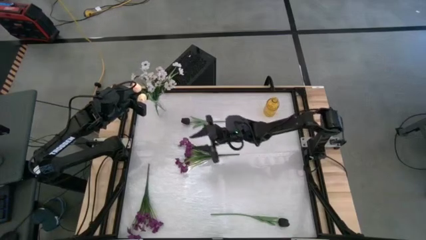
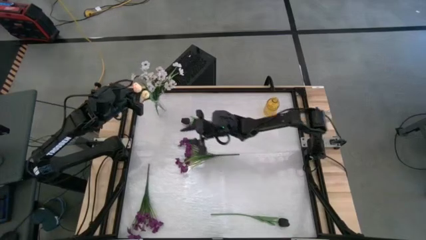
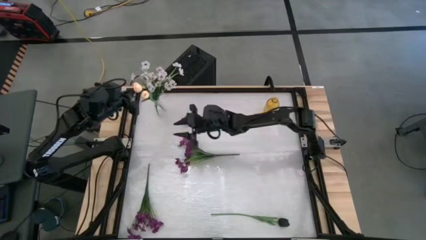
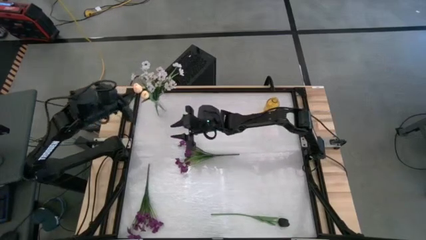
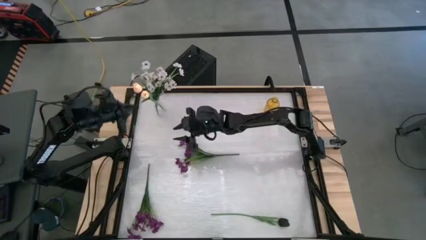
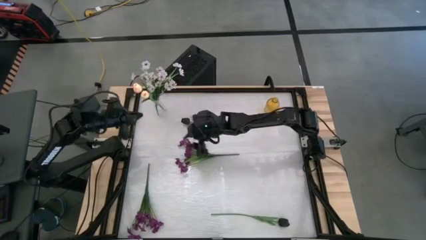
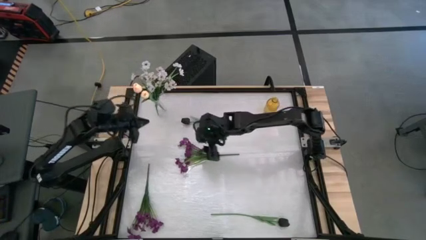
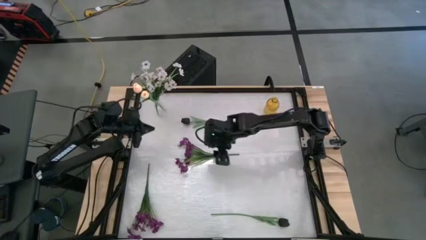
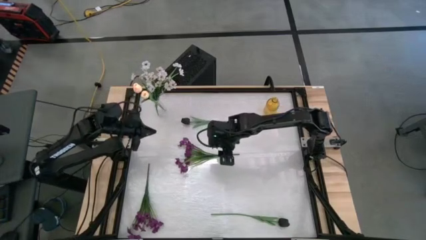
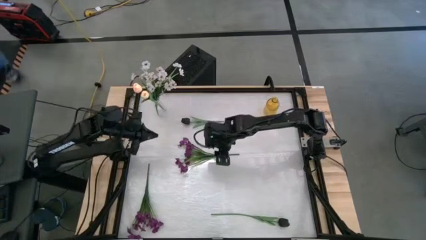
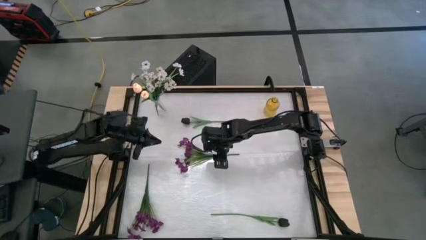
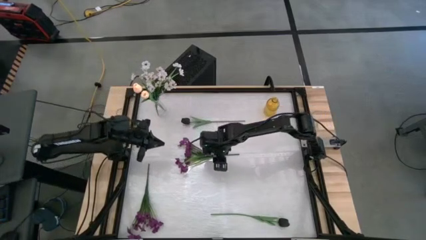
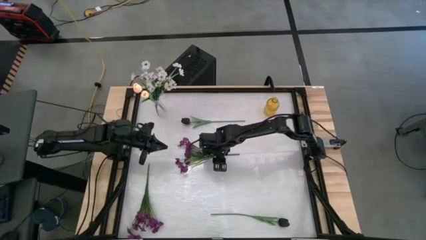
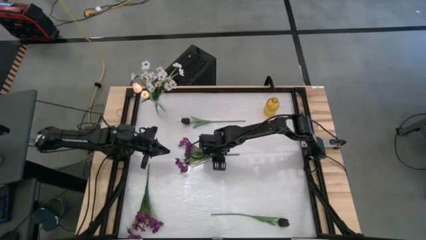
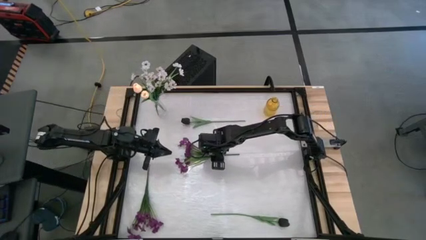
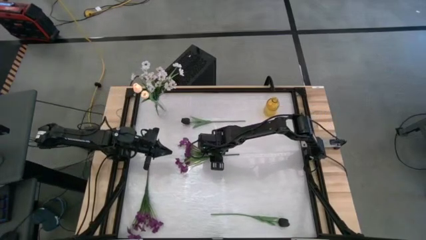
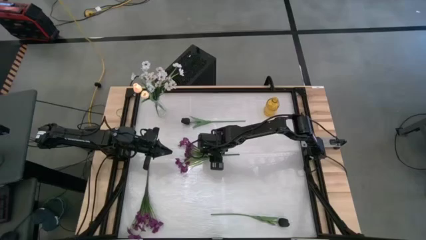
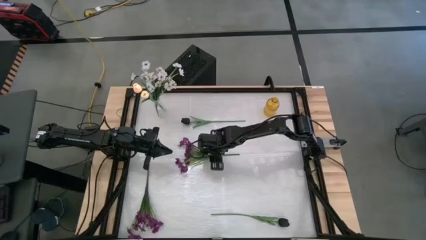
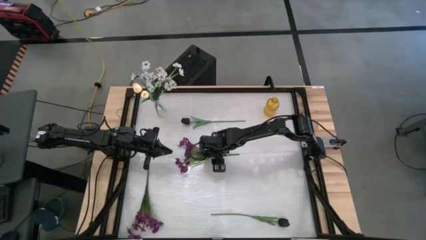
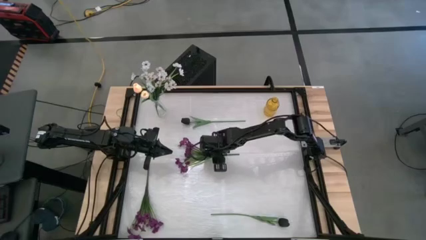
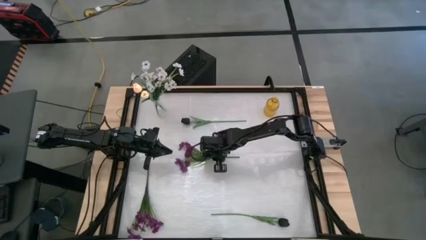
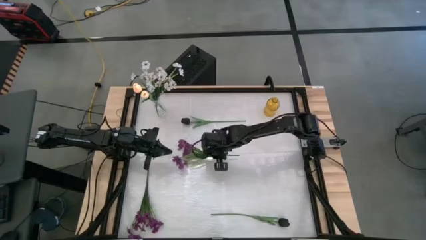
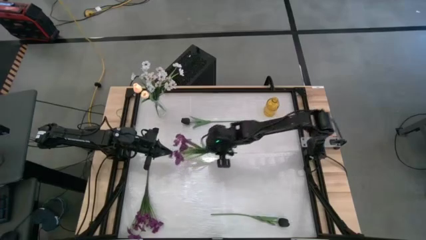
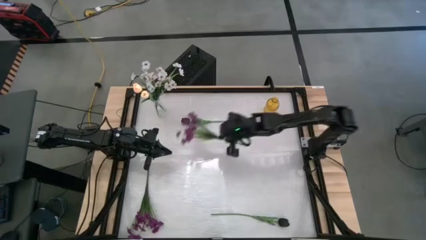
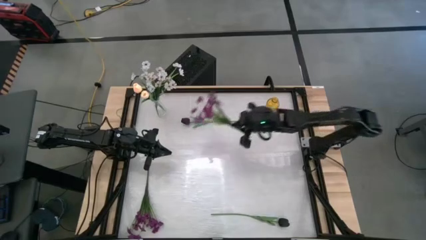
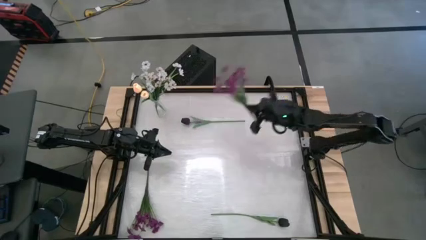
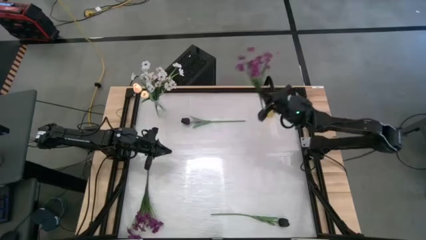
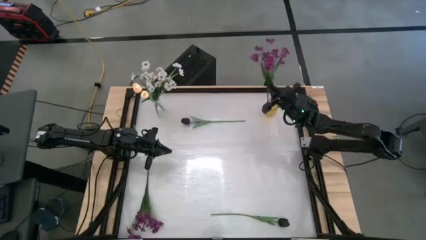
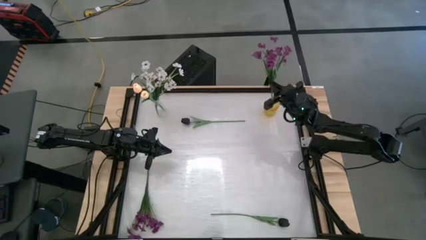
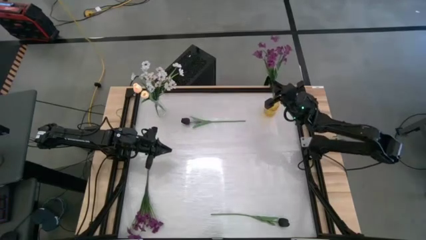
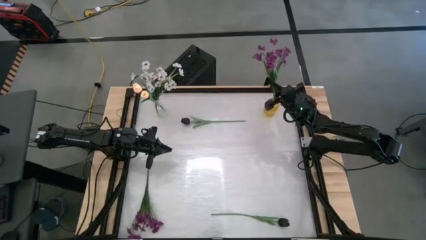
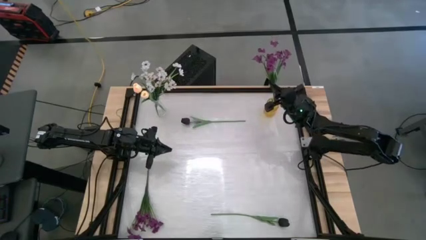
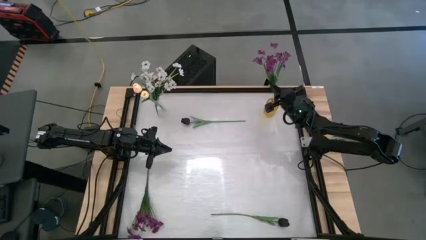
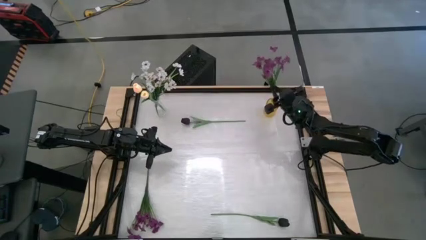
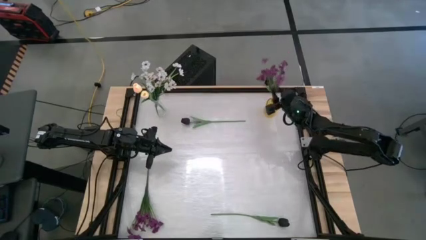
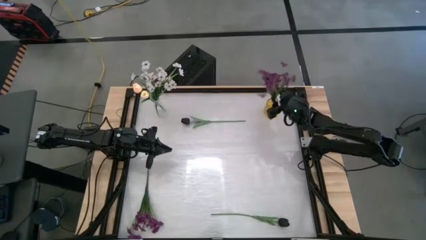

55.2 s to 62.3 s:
Task: Sort flowers into vase by color
Put the top purple flowers into the yellow vase

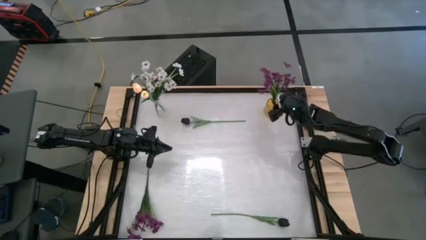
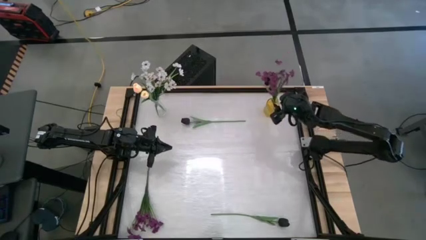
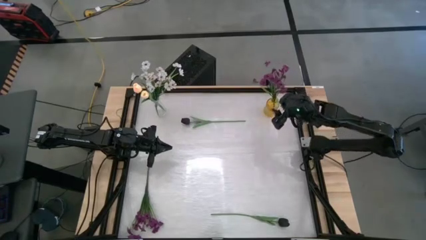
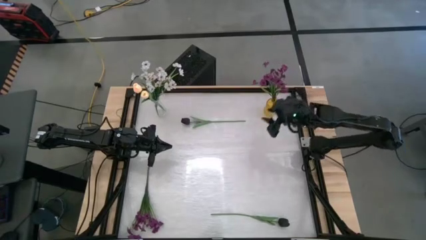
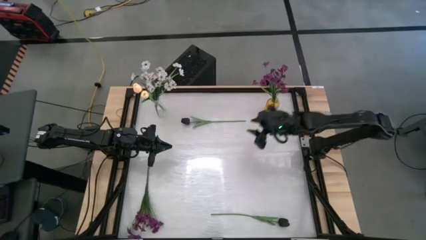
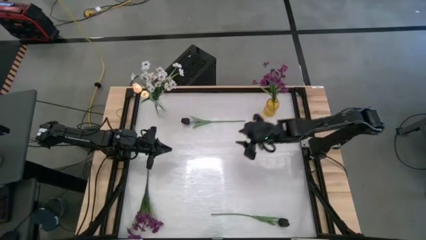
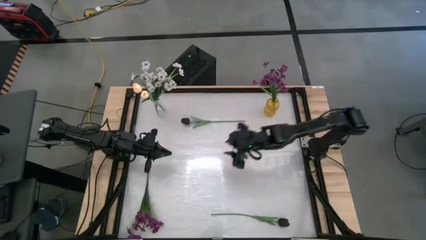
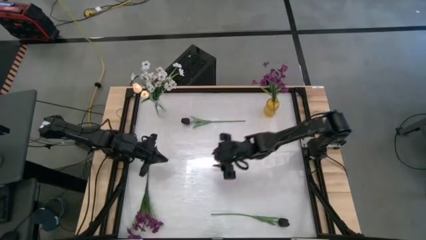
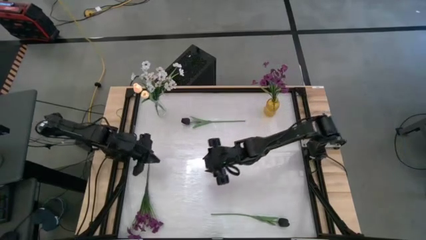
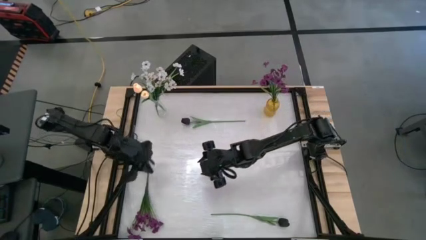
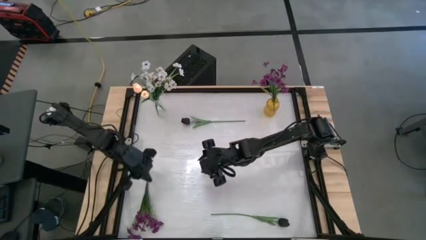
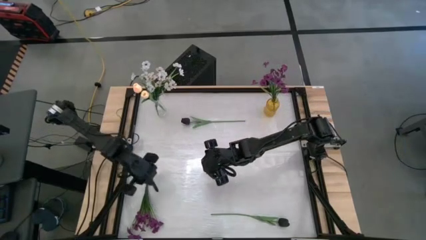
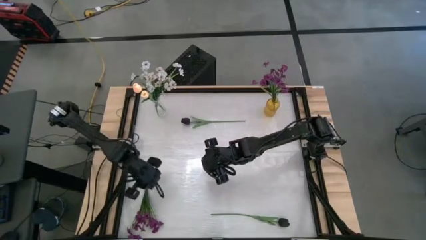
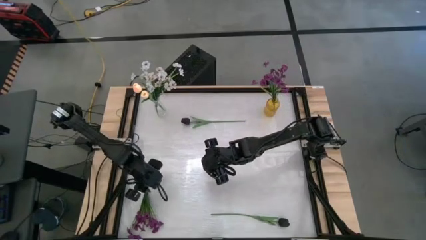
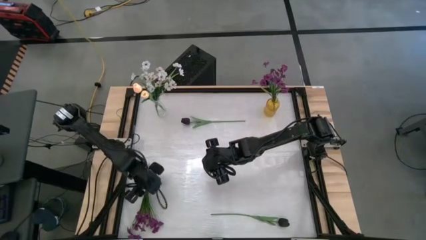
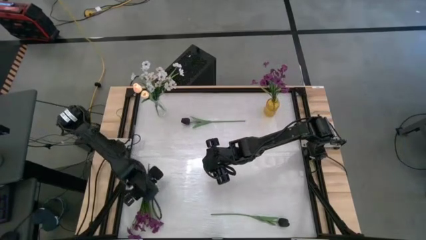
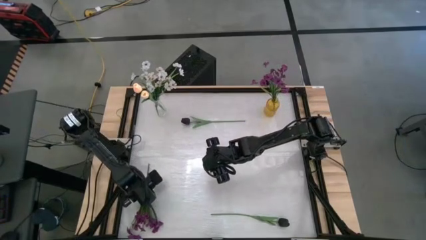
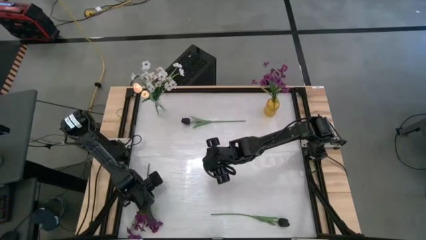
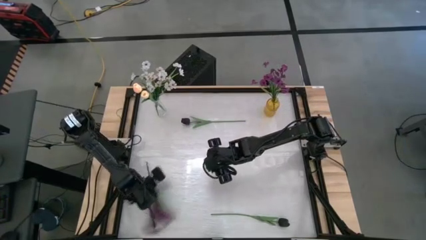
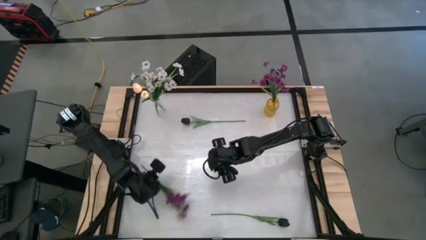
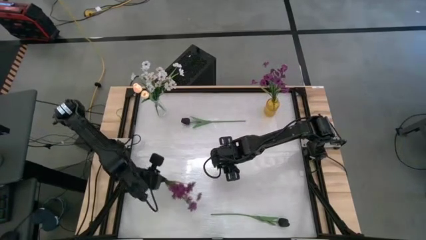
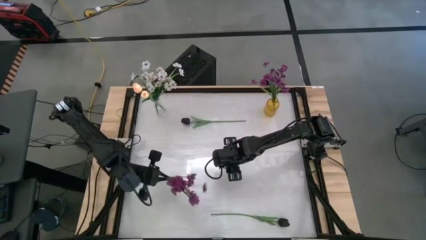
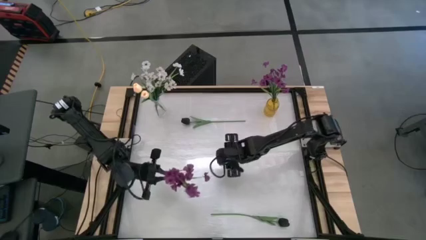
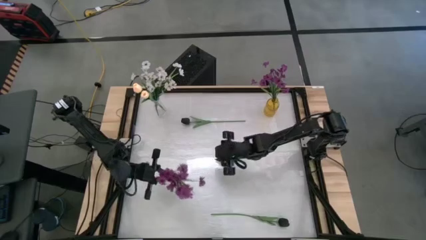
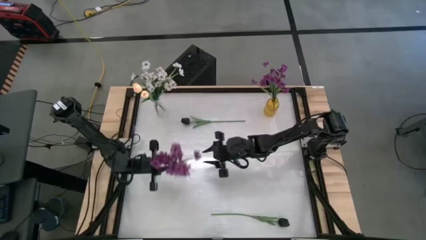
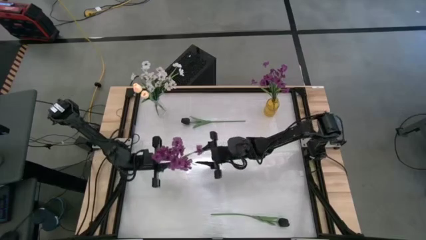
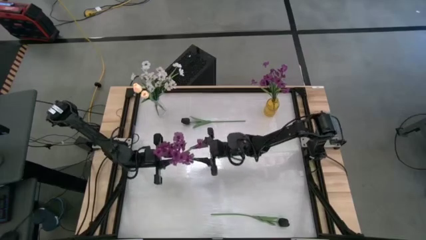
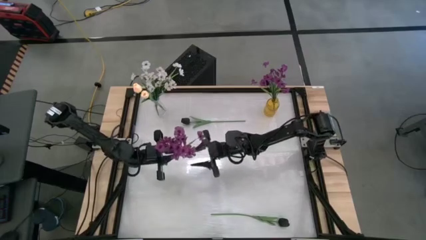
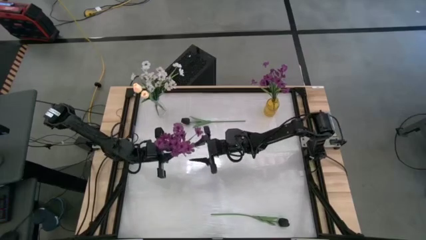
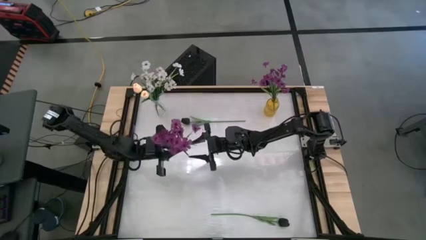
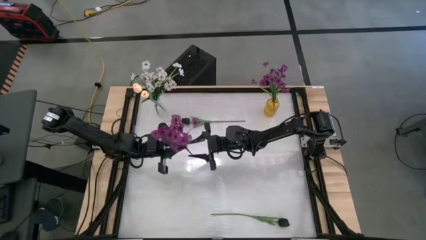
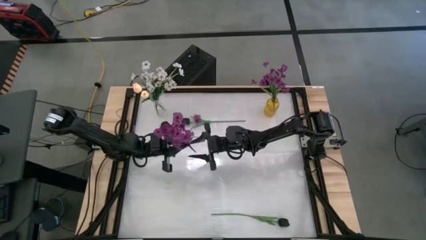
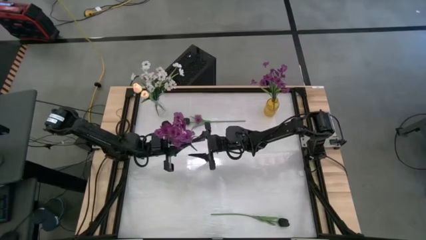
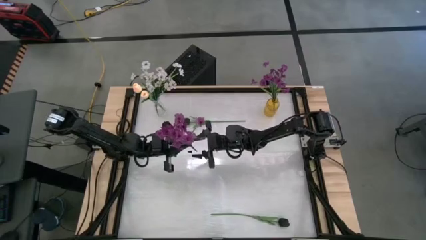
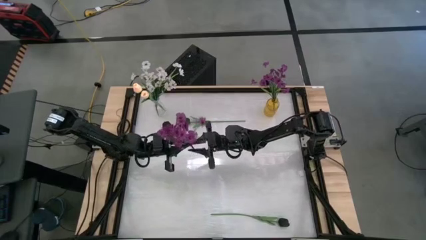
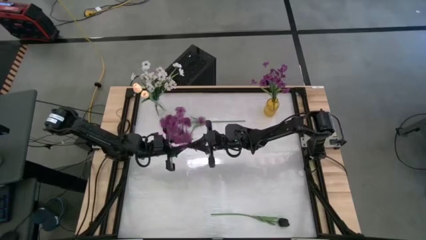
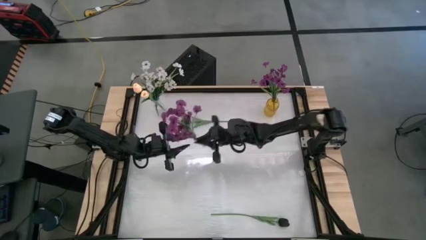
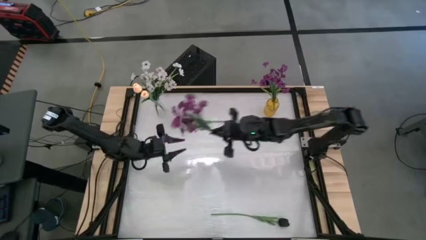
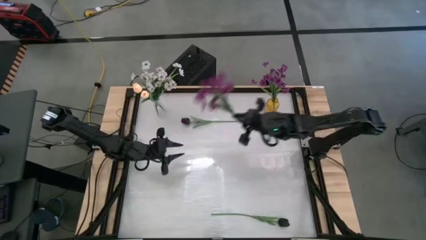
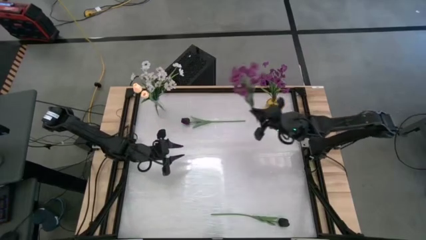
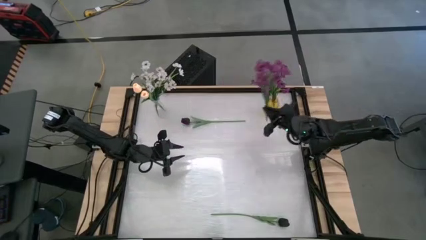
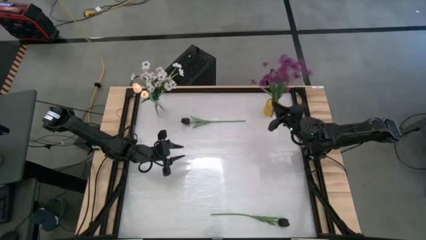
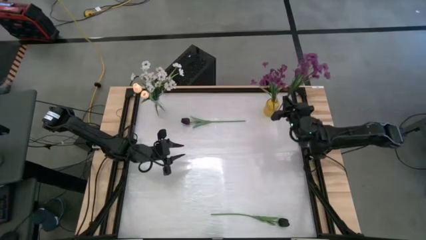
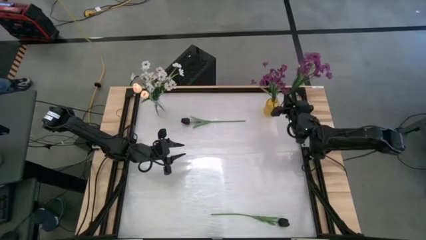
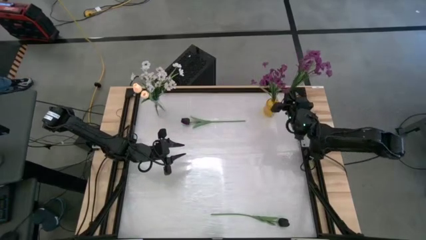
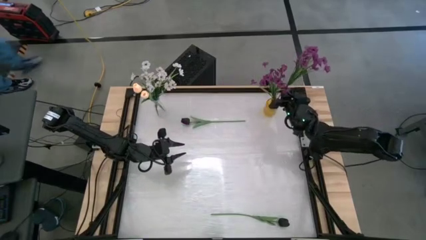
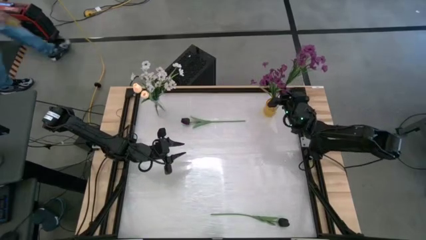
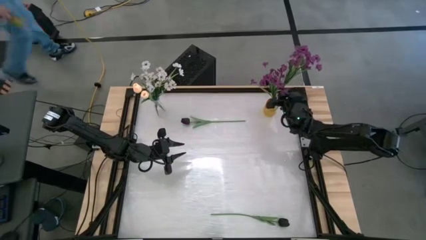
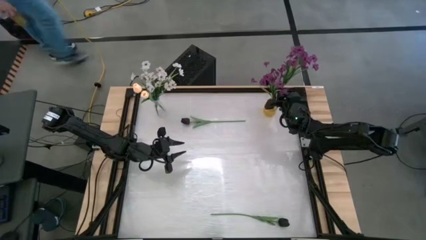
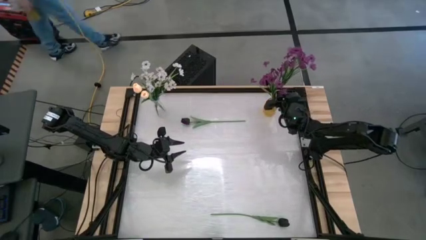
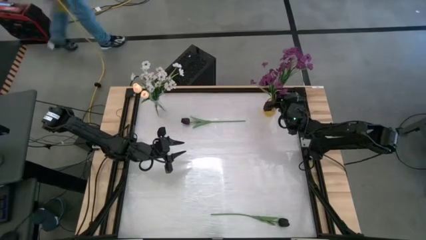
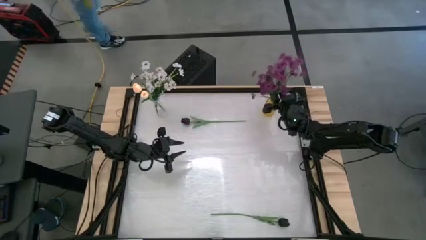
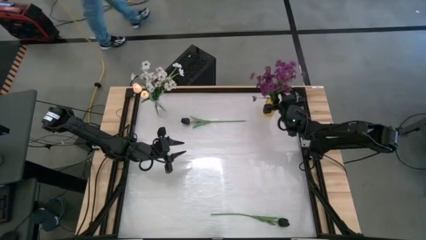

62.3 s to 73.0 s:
Put the purple flowers into the yellow vase
